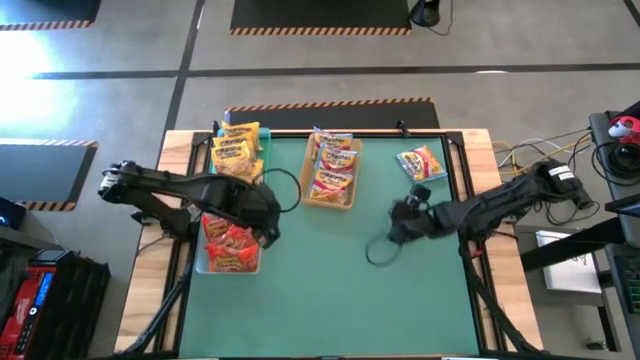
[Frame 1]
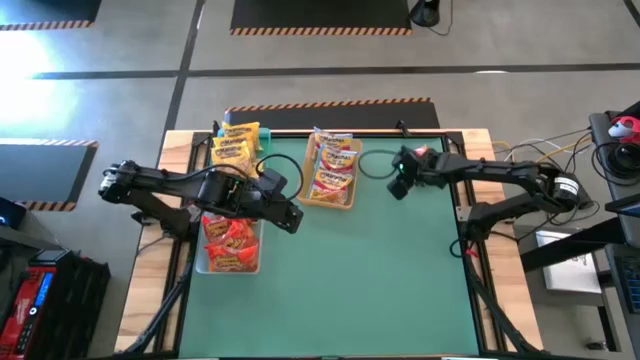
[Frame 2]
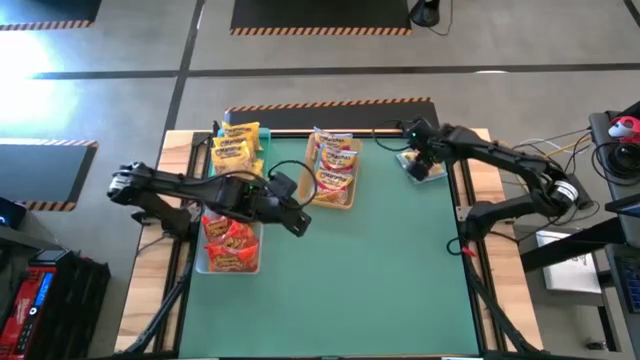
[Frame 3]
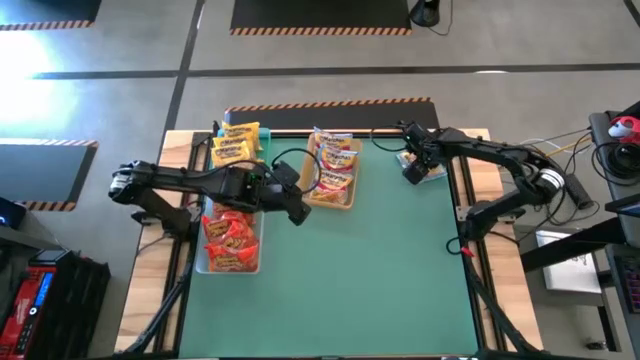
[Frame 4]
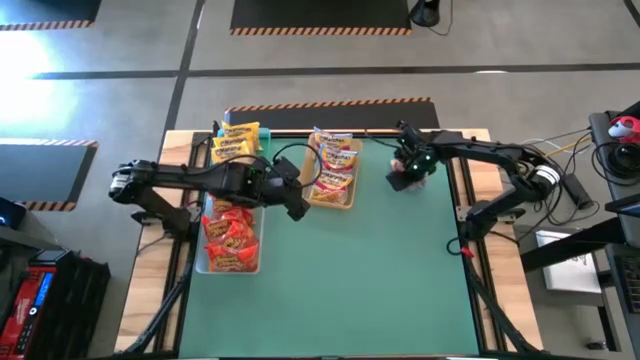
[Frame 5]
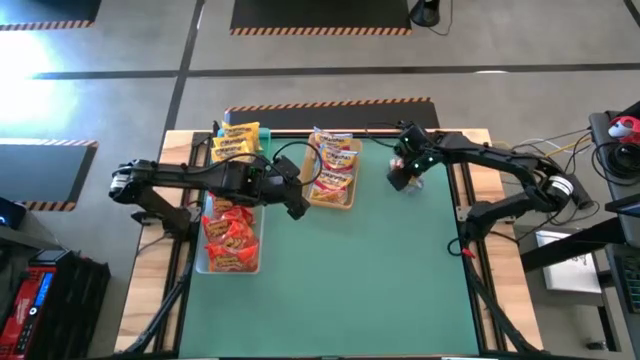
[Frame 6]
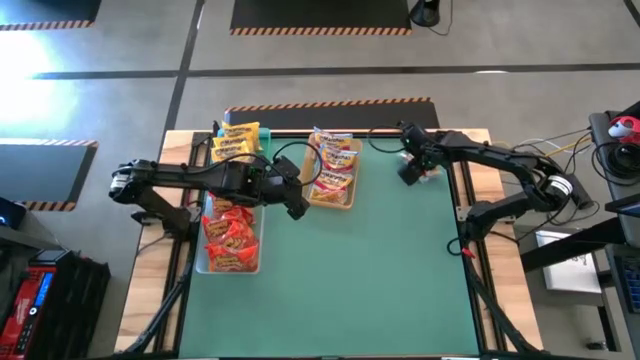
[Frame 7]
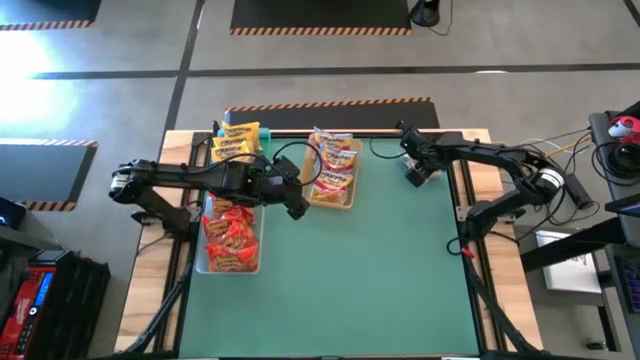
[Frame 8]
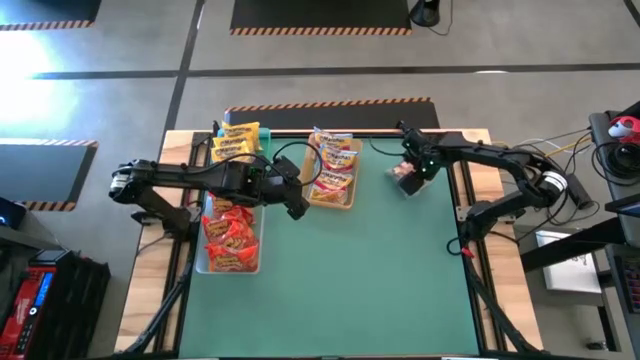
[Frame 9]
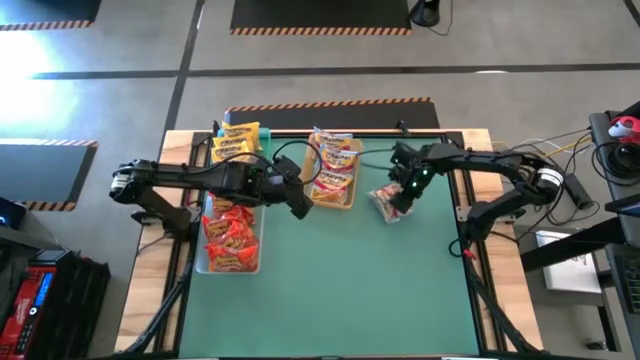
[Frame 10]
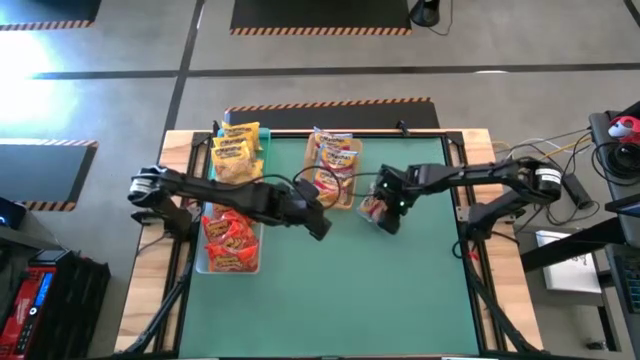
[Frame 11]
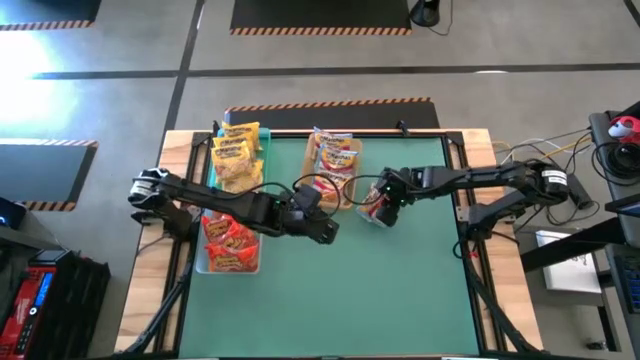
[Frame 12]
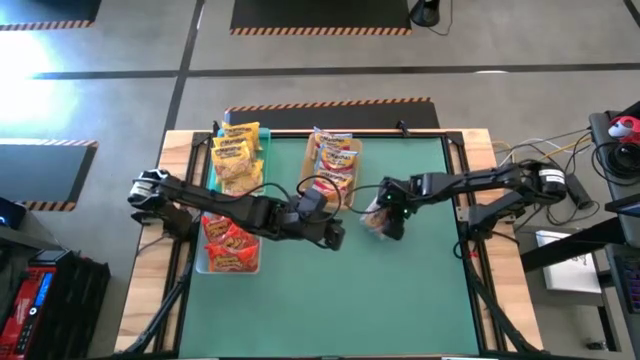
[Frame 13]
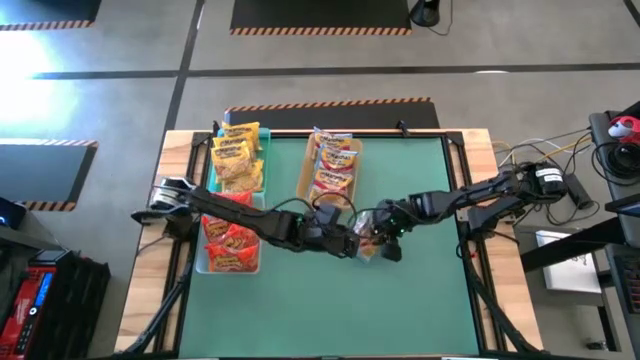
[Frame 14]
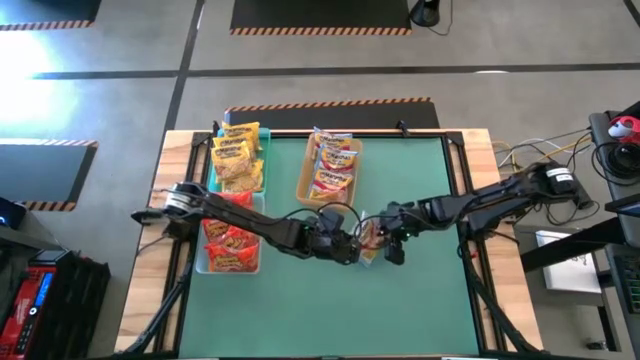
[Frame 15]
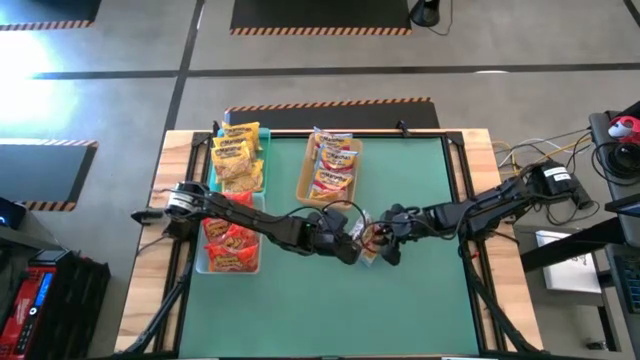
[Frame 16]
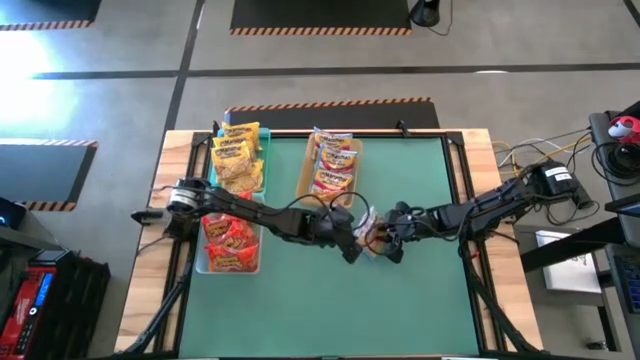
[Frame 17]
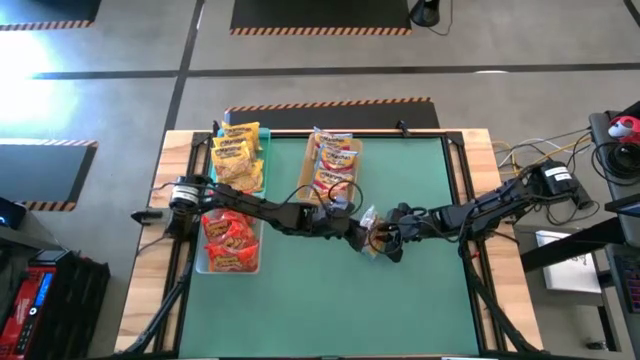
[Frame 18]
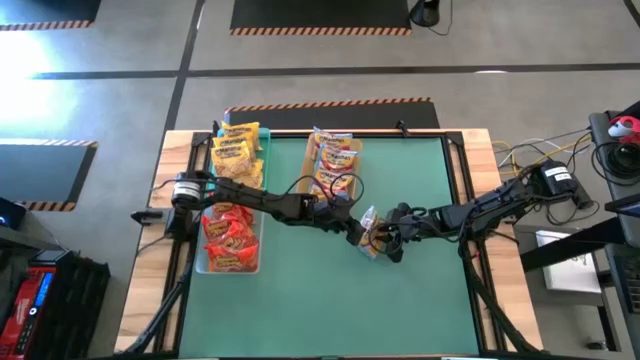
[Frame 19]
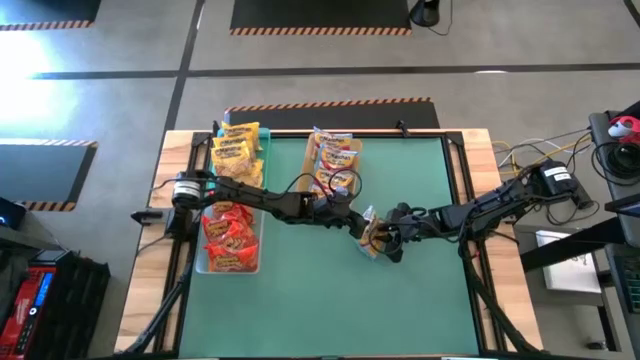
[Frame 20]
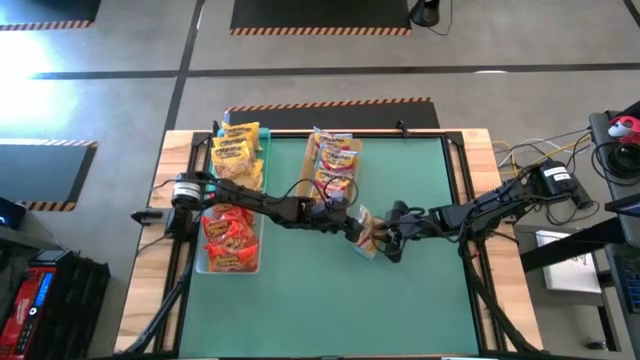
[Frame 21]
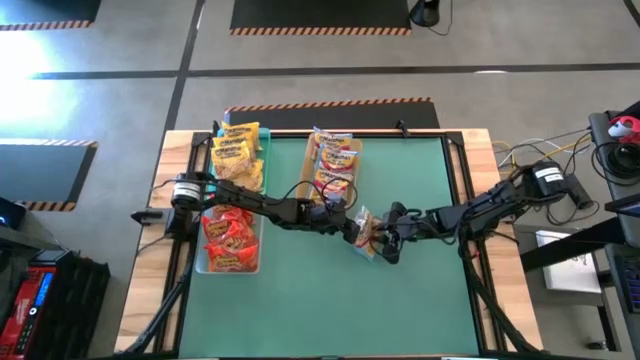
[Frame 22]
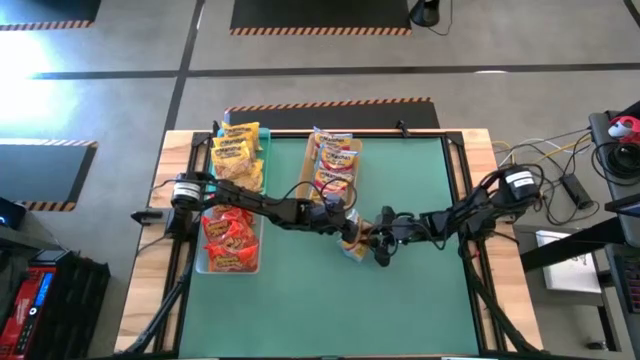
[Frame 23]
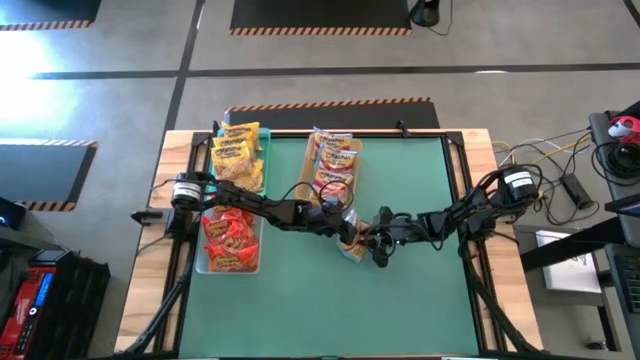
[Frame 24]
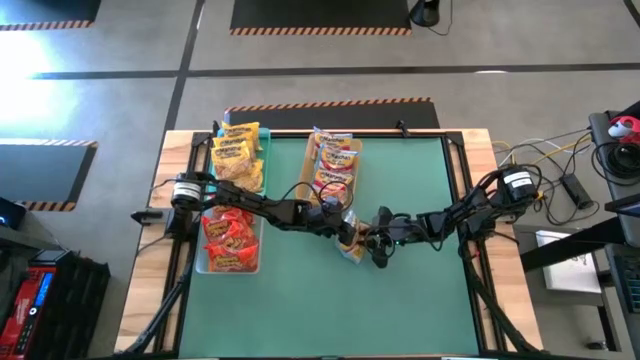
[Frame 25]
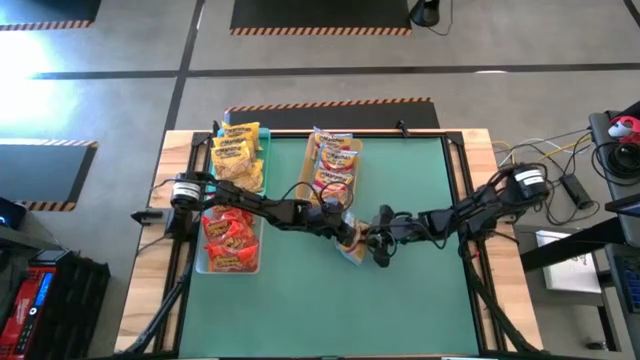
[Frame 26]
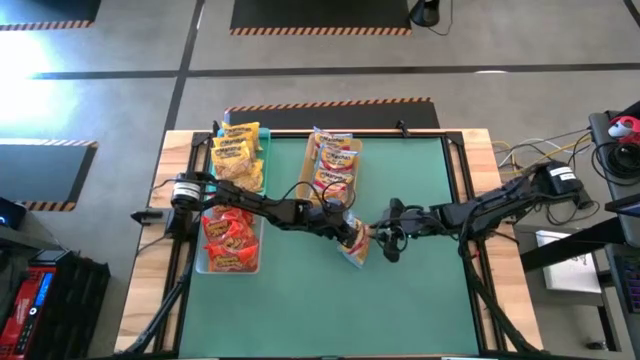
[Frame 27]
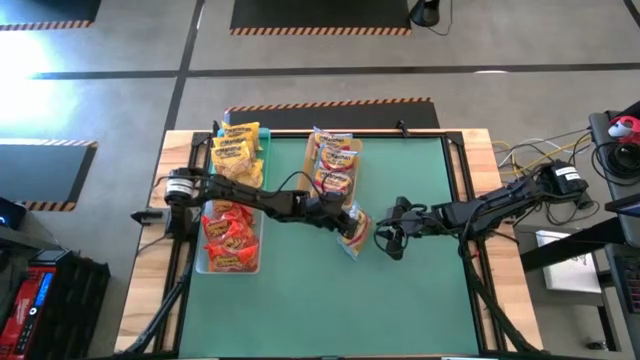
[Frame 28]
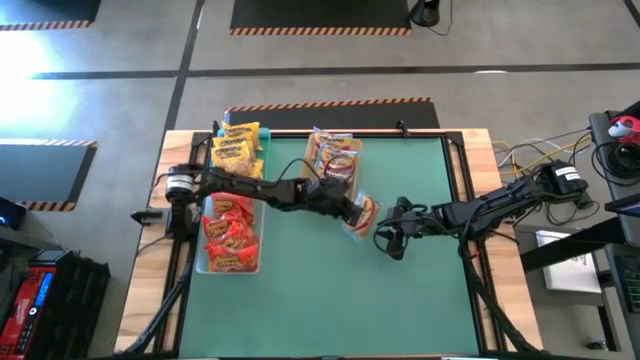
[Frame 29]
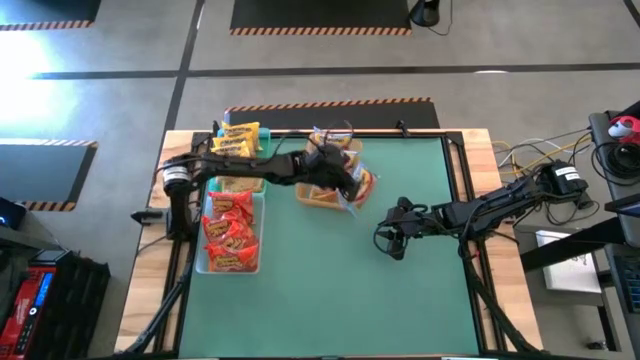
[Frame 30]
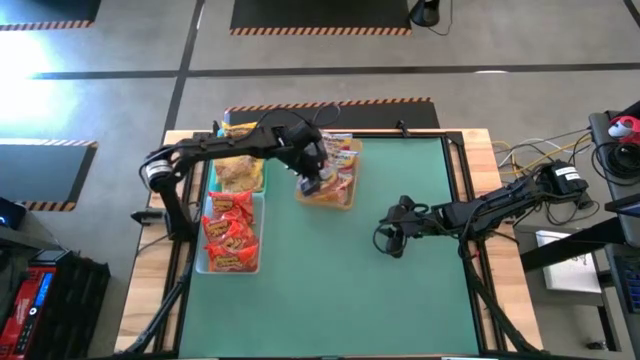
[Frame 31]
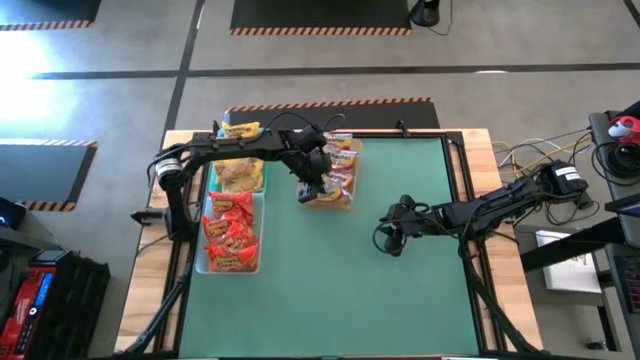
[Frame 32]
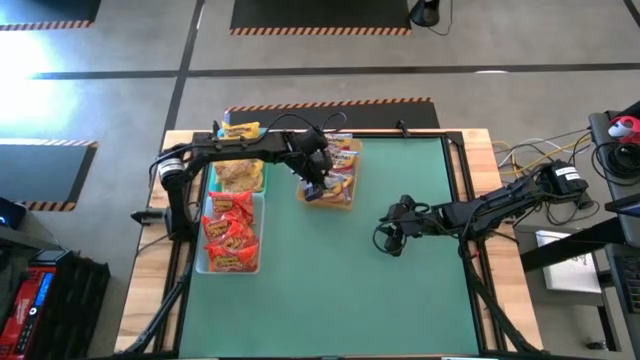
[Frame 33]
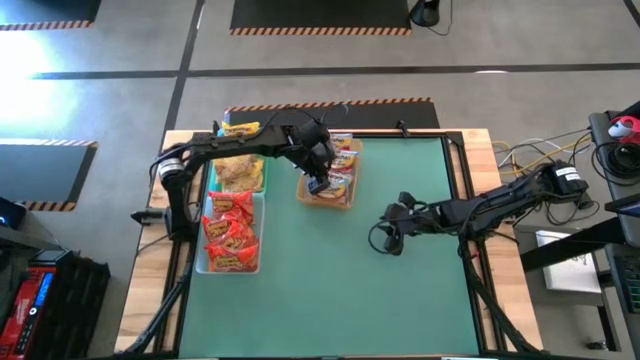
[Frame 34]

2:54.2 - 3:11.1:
Task: Sort Maruchan noodles
Put the blue noodle pack into the orange bin

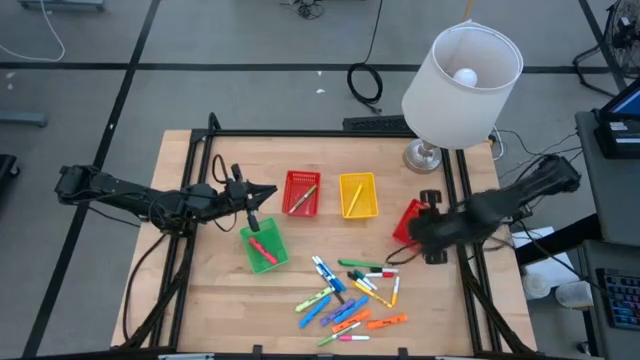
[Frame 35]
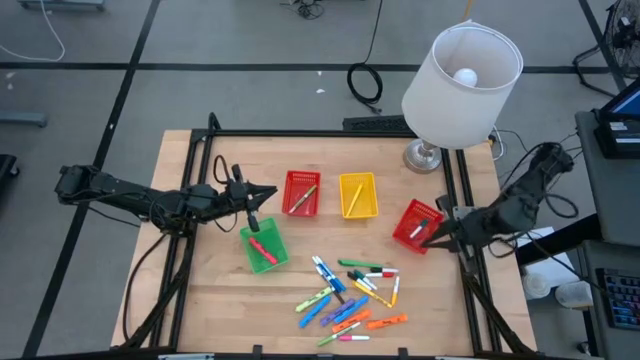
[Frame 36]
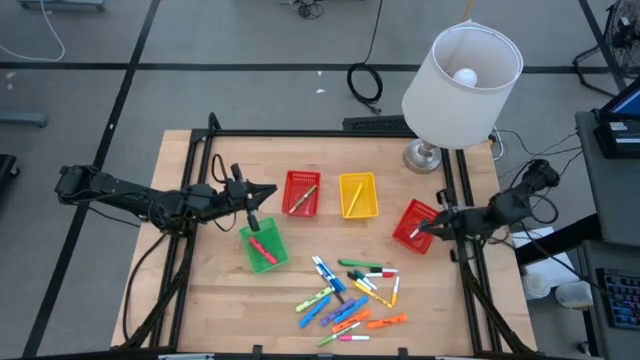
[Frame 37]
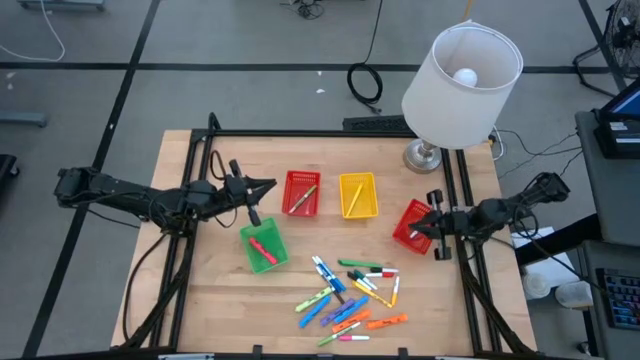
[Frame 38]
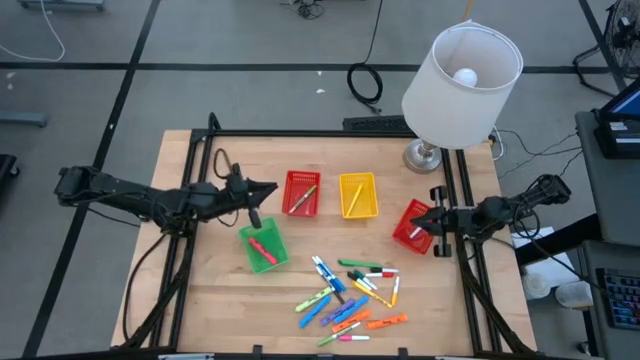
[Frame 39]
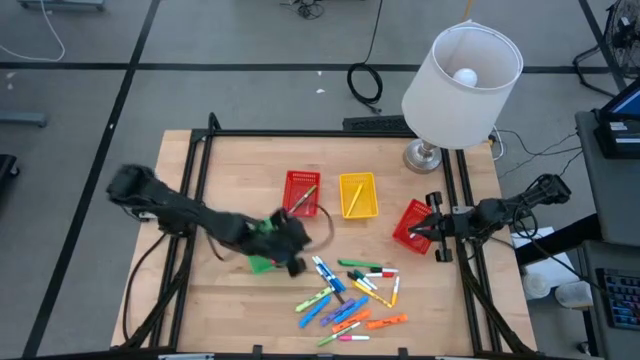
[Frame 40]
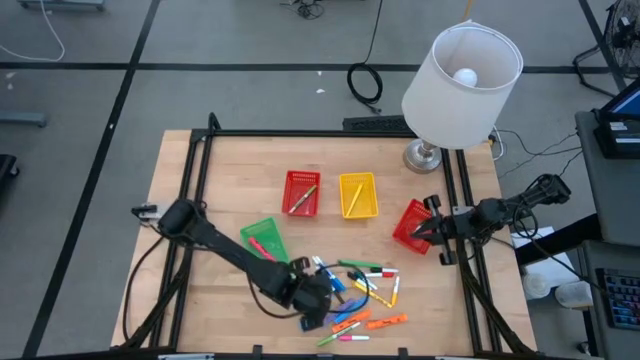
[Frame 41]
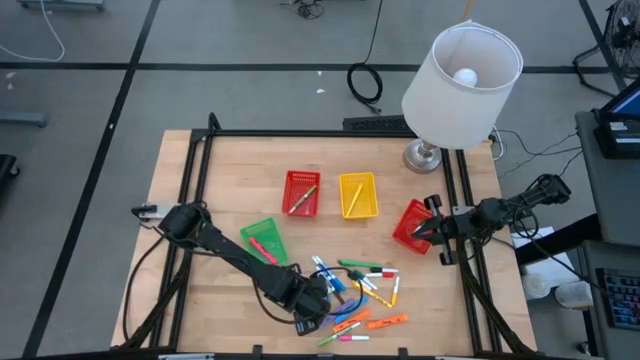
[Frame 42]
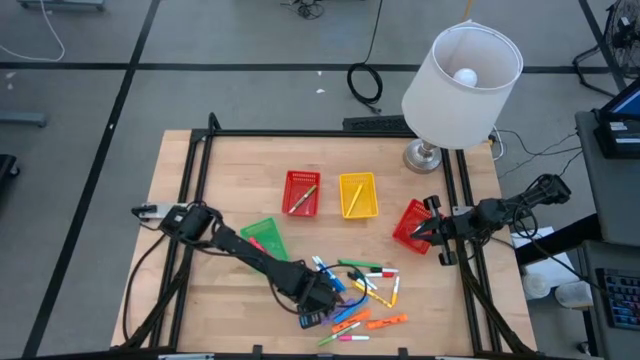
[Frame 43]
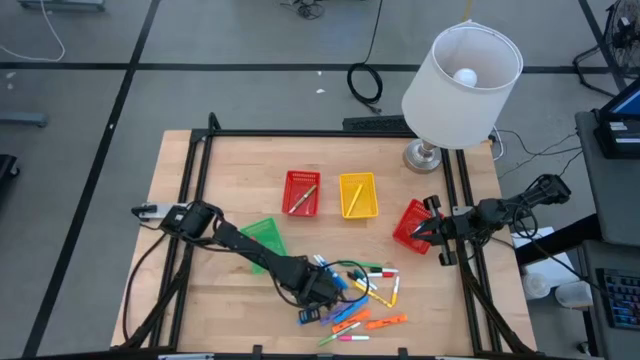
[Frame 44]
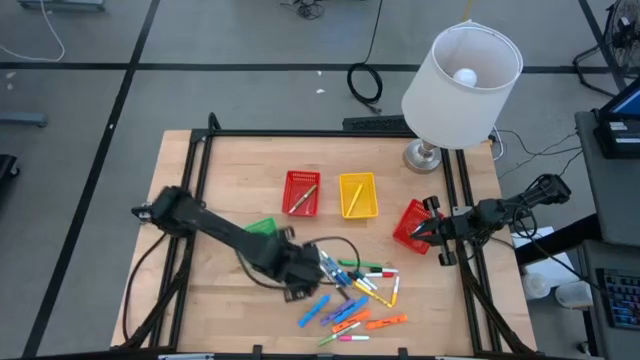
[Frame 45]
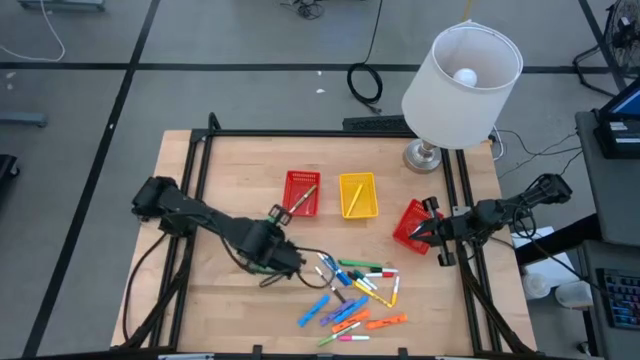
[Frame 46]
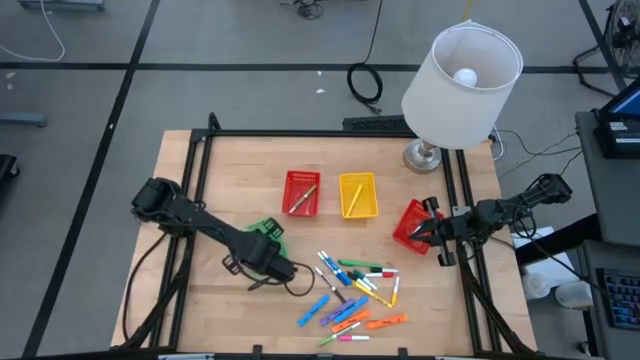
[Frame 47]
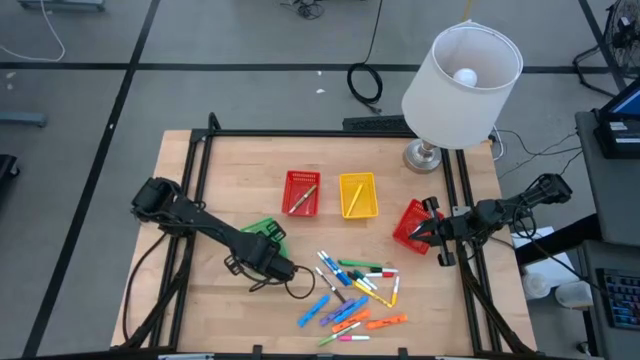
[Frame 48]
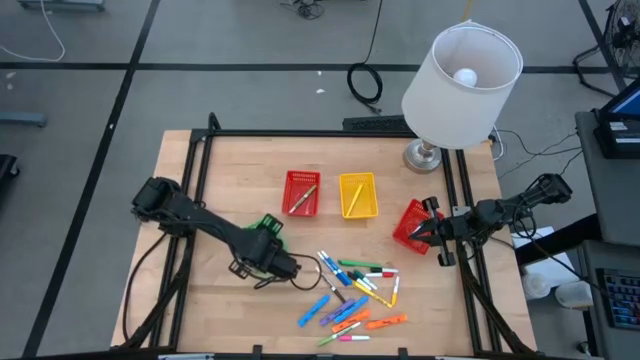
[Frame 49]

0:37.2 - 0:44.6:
Task: Pick & Place Markers
Put the light green highlighter into the green bin
